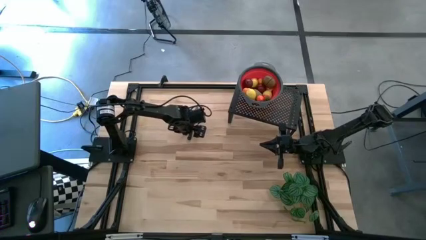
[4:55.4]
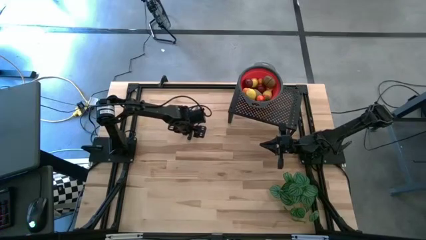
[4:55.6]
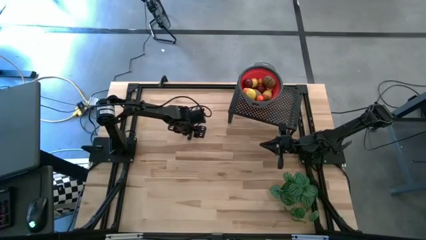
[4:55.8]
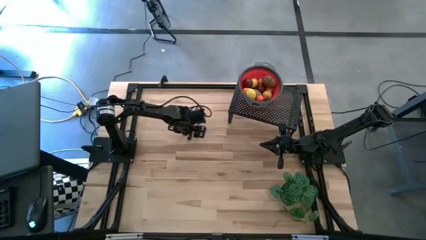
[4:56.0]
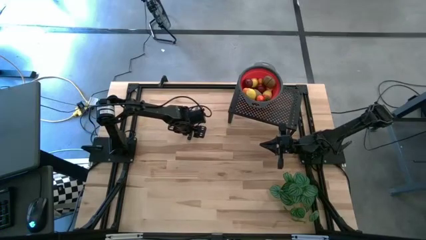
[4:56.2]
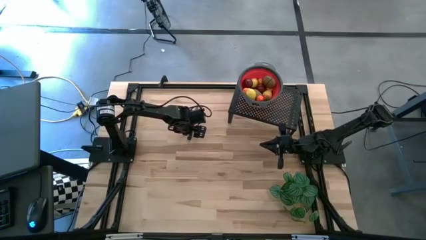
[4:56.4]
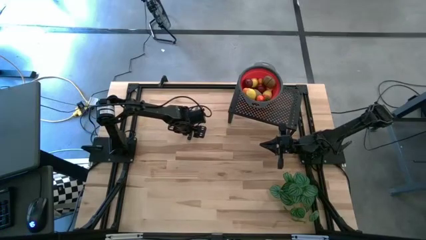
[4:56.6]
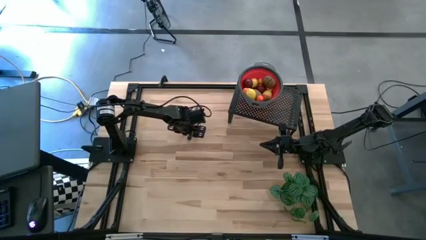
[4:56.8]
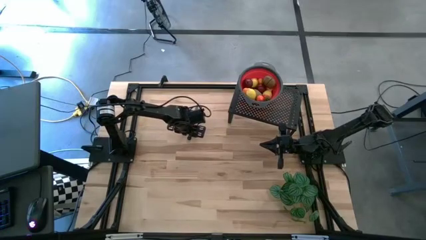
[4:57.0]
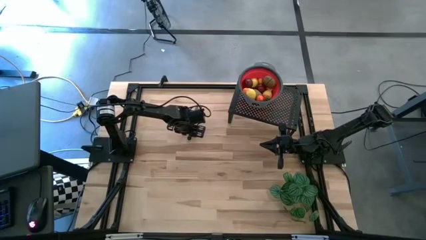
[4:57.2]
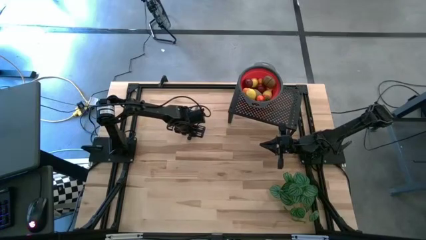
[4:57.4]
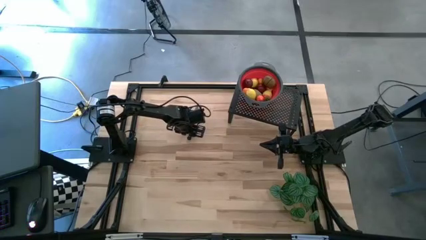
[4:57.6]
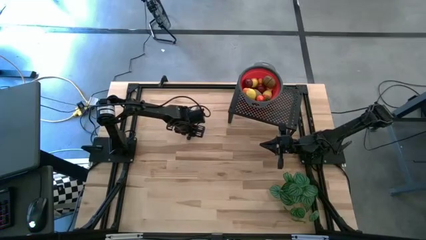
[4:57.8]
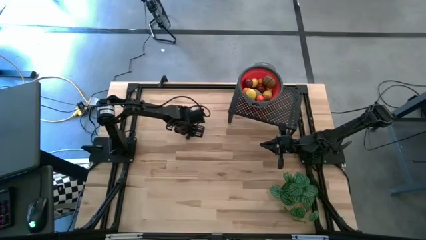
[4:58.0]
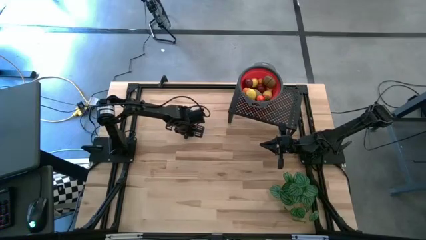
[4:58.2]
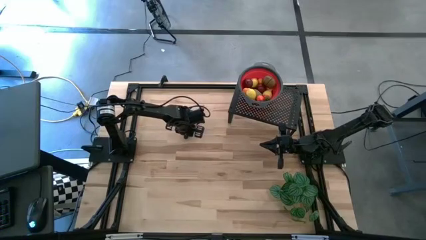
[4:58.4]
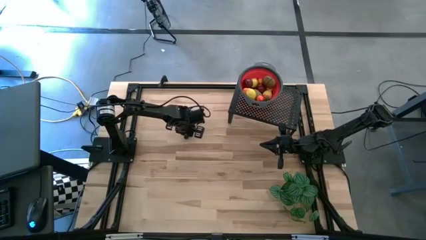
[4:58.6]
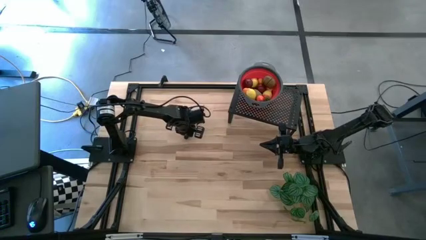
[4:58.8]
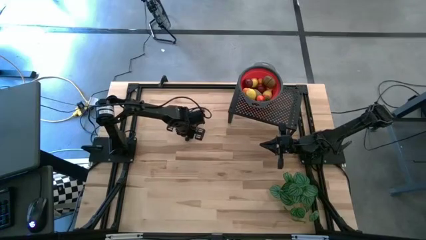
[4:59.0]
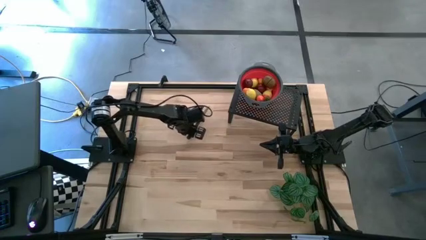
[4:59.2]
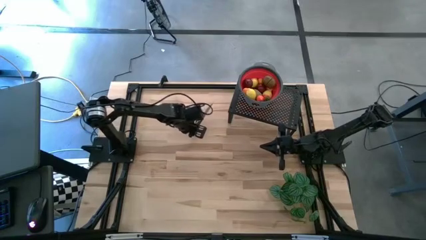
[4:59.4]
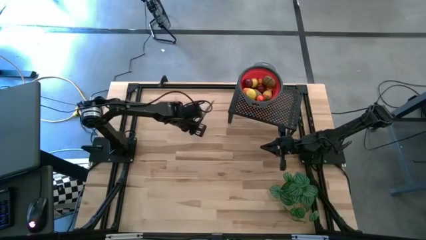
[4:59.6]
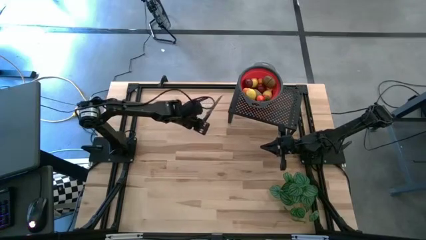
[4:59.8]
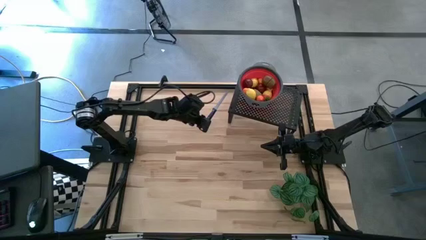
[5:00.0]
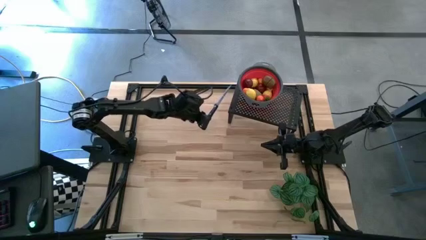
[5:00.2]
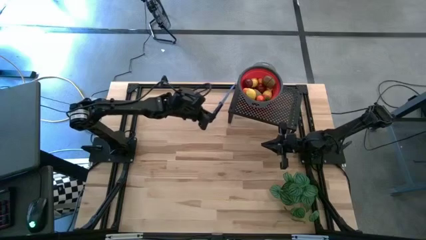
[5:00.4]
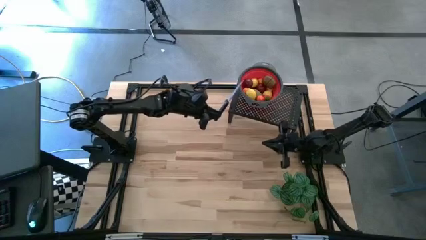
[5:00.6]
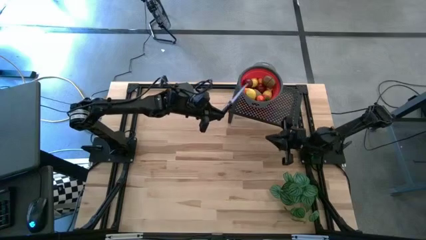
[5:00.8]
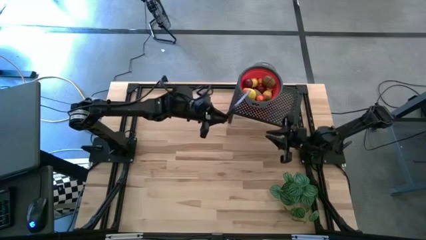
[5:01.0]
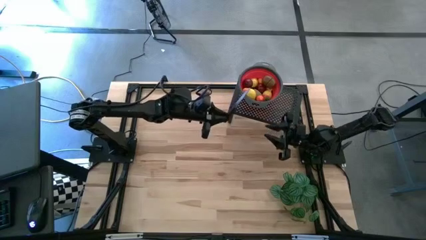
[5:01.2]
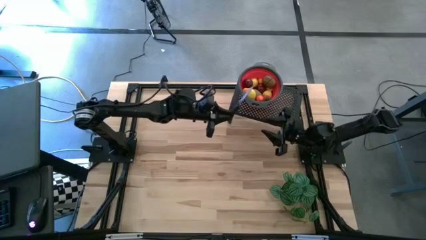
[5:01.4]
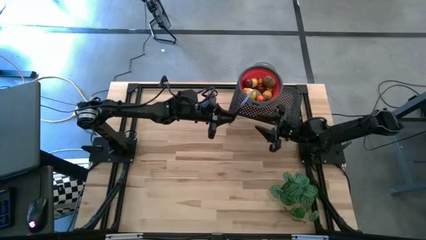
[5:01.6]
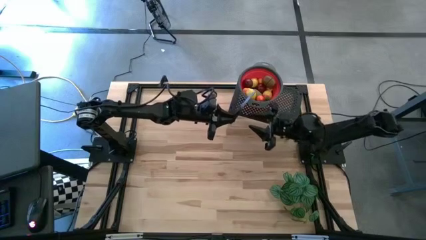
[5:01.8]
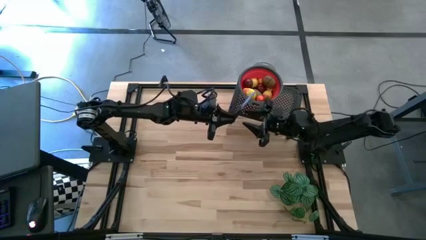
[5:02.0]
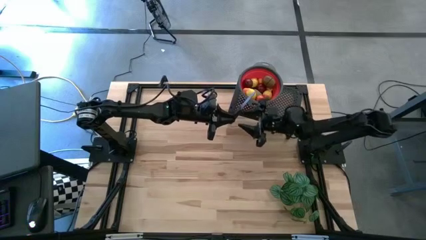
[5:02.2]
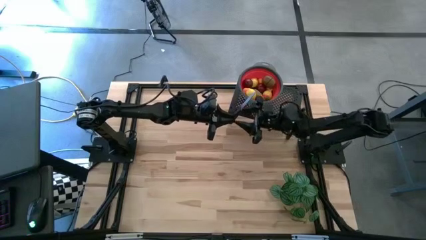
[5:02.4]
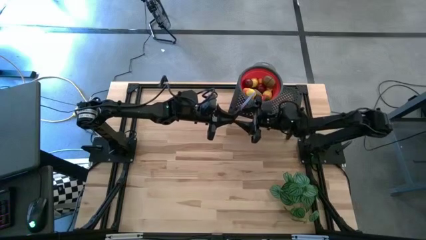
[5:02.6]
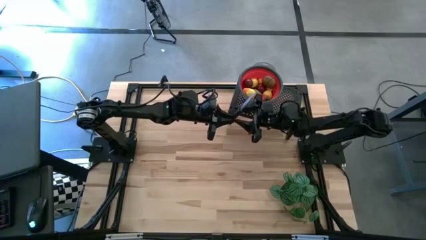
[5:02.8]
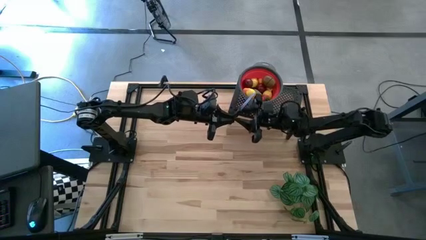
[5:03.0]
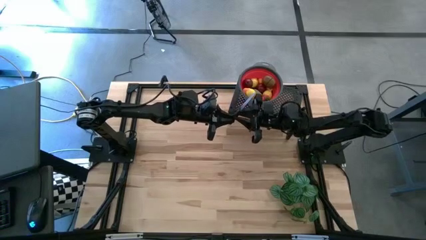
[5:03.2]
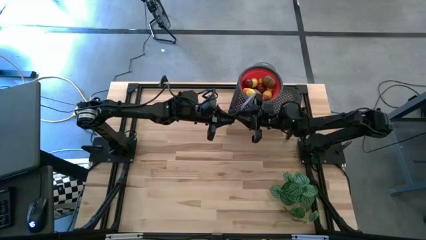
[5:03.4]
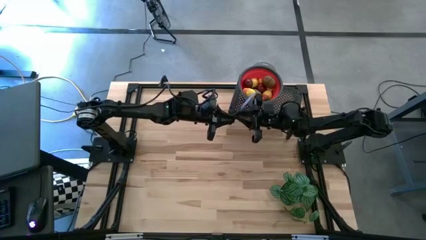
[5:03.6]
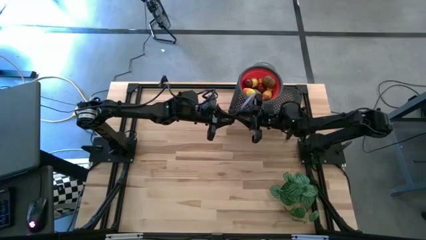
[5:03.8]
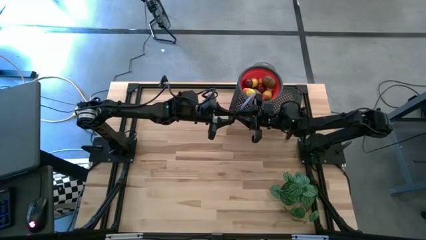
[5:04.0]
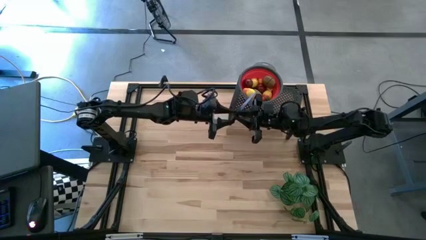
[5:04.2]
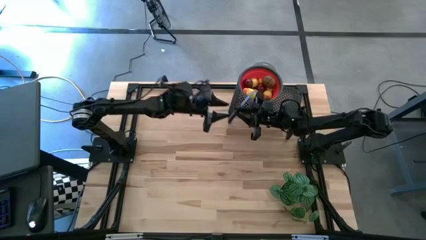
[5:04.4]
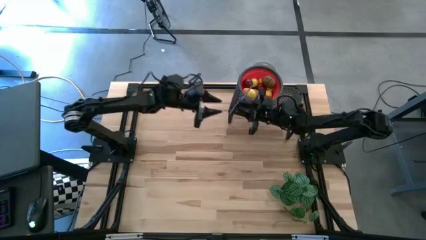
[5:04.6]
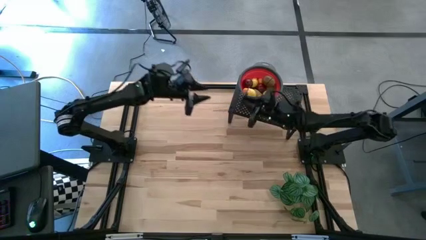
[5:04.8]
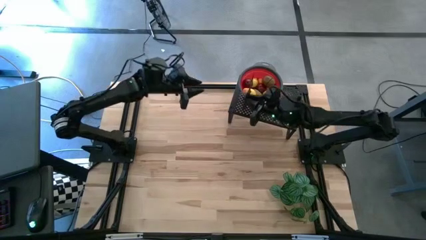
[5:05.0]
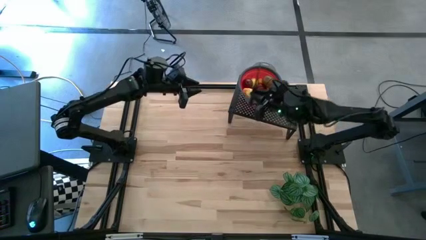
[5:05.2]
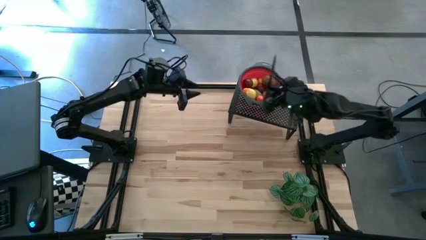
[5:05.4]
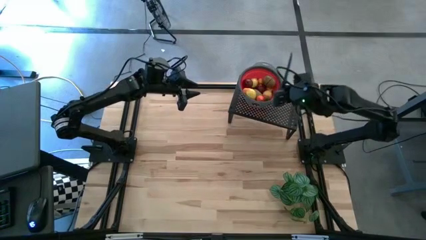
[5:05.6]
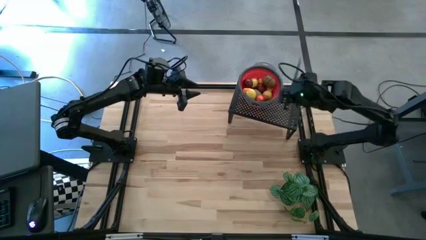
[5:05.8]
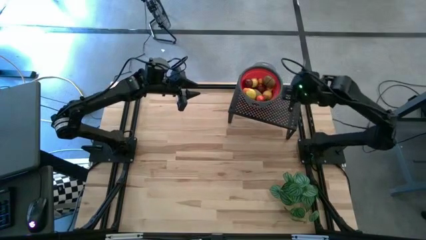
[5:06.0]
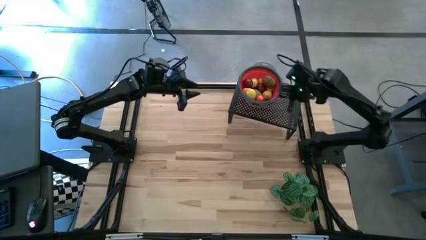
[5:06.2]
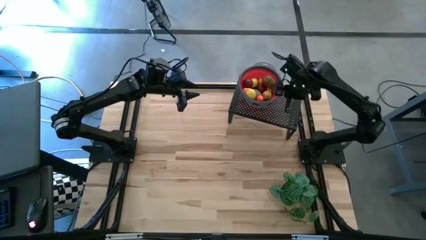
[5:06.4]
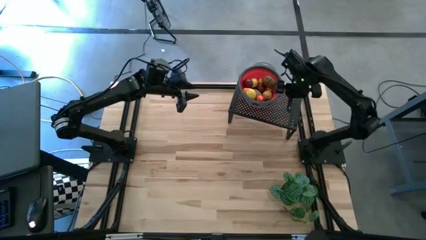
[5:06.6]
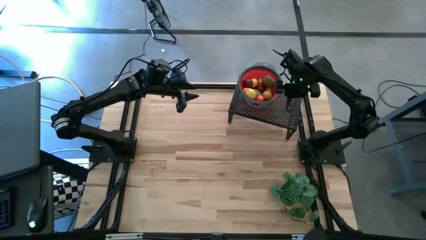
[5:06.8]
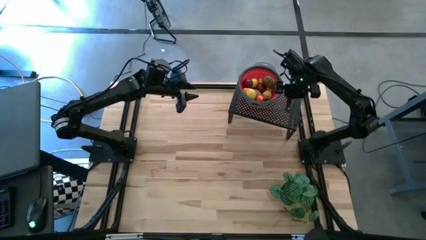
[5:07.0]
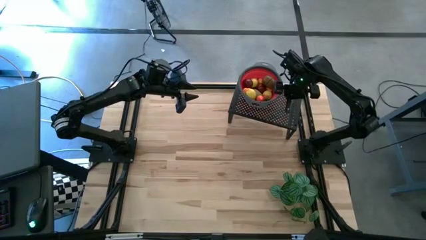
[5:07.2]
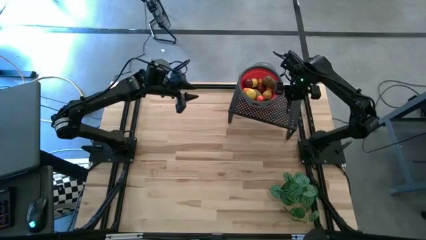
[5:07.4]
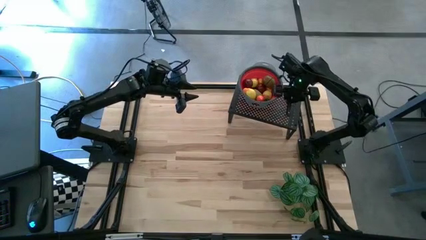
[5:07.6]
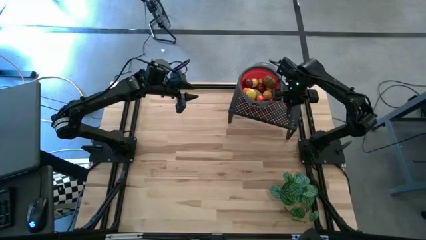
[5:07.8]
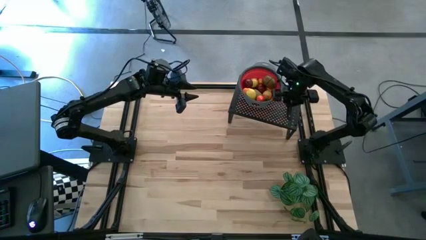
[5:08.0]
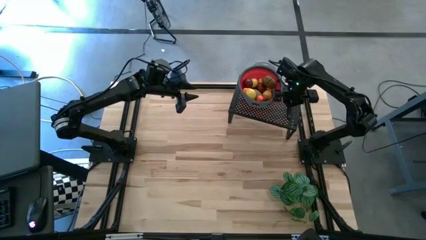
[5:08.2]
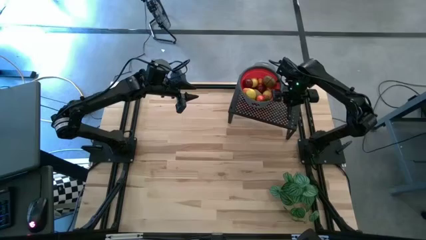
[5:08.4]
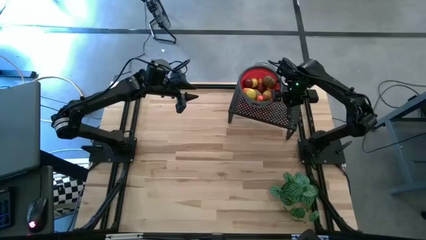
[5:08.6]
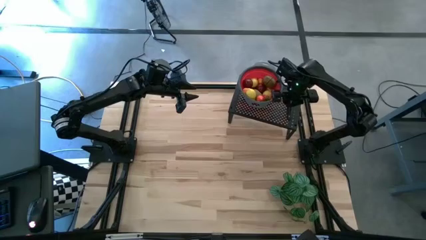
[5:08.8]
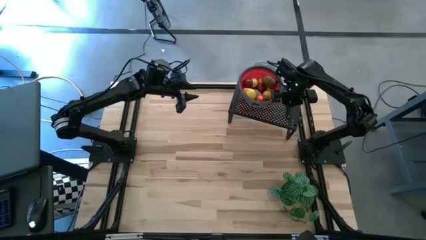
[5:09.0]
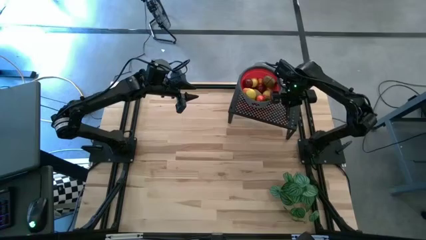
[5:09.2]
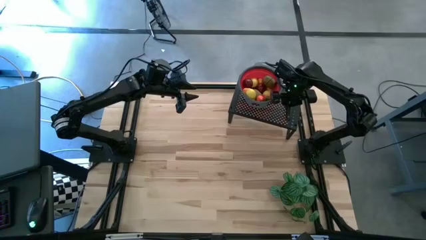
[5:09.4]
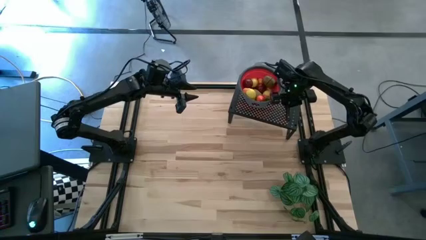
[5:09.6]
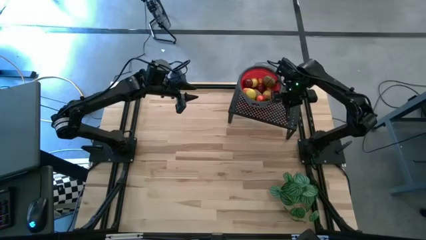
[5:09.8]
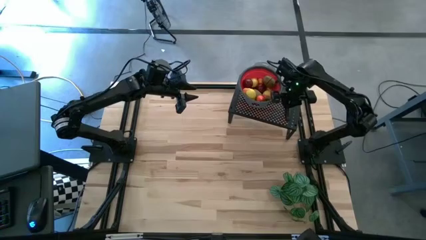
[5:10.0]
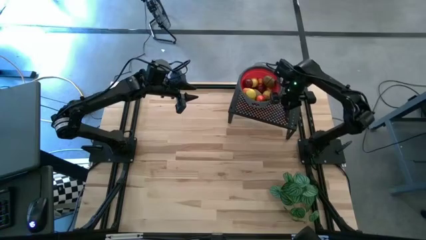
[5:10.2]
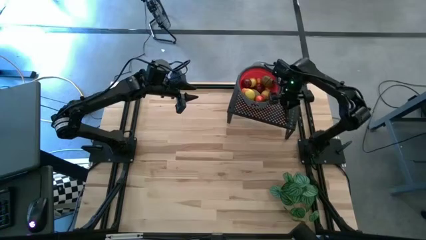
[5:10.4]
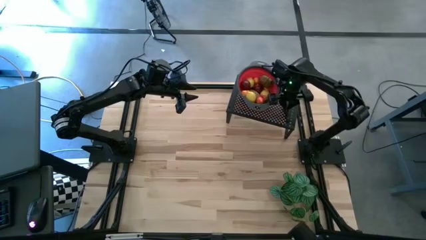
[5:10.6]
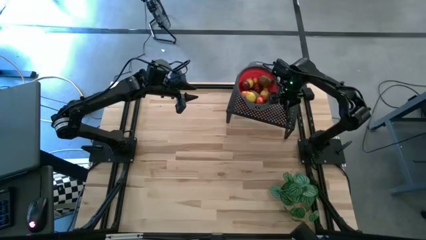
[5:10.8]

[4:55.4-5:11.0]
Task: Pick & Place Fruit
Put the black knife on the shelf

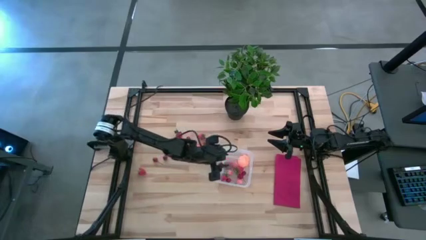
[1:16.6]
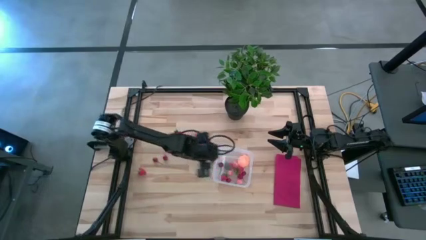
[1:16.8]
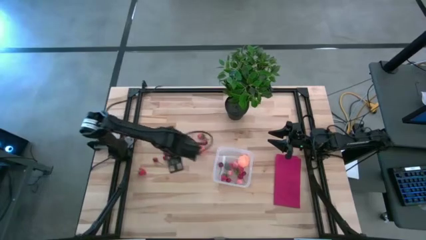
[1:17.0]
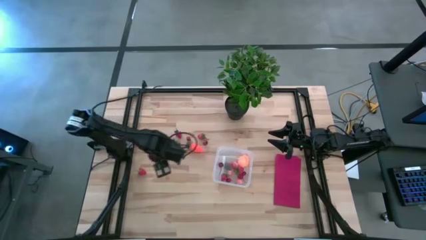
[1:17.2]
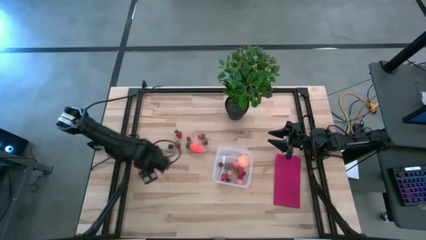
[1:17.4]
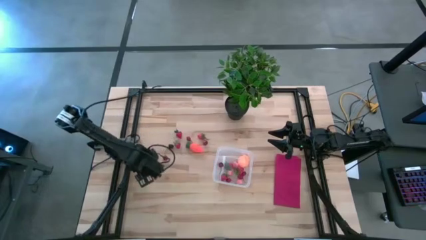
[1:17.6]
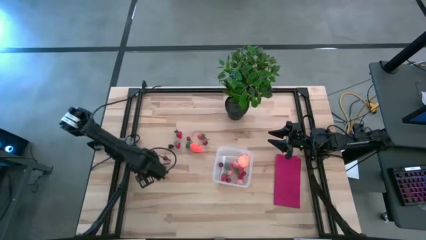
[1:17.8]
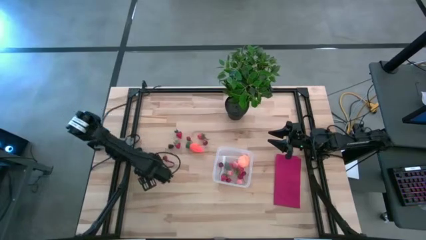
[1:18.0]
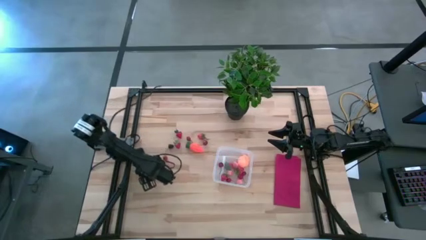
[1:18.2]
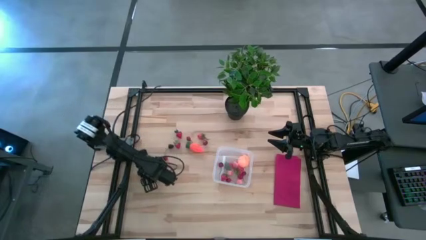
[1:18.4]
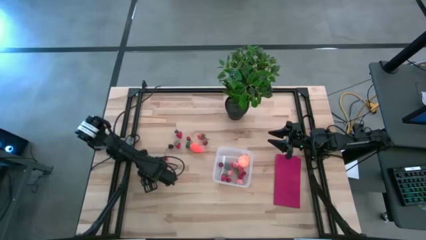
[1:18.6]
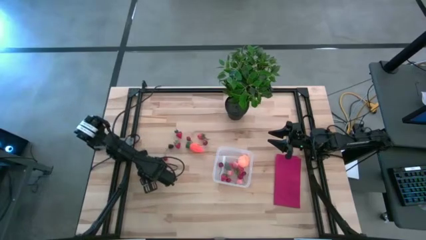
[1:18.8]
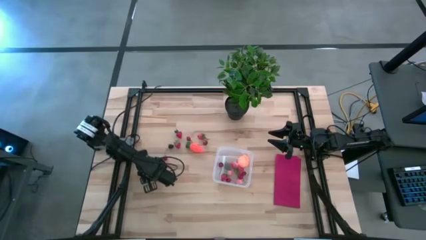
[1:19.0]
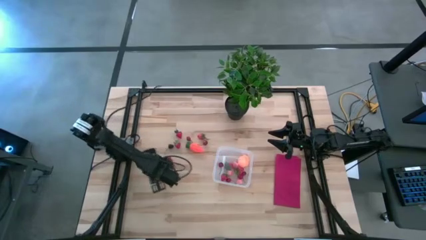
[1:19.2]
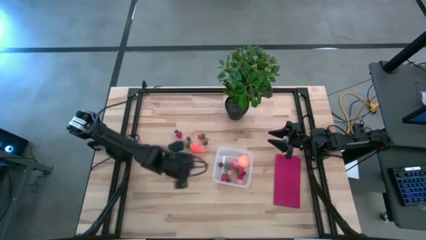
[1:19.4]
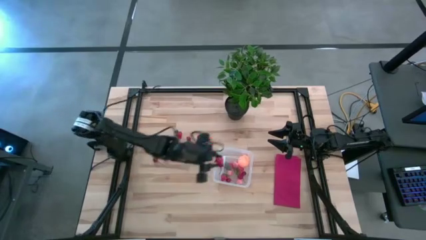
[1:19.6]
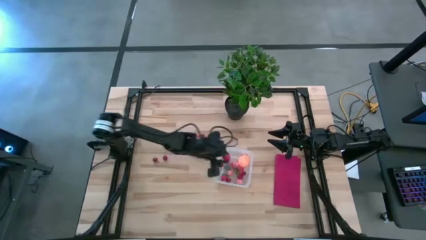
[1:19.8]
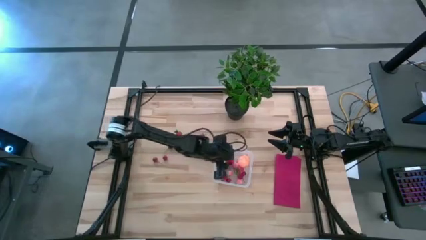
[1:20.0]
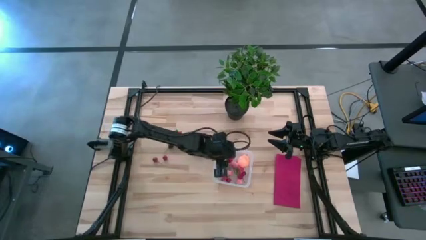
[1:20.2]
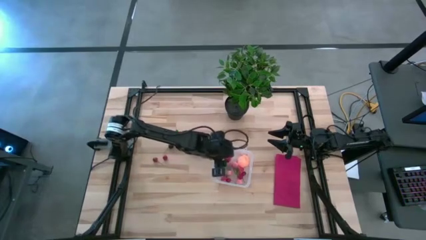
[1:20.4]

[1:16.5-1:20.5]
Task: Pick and placing Produce into tupperware
Put the red strawberry into the transparent bin
